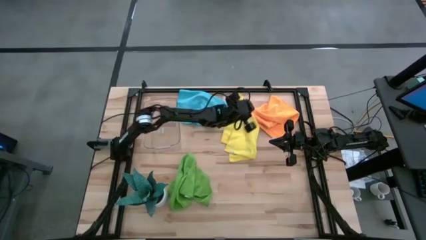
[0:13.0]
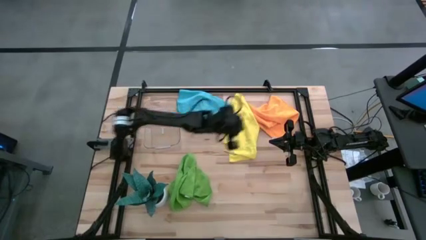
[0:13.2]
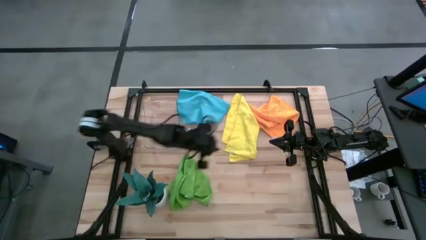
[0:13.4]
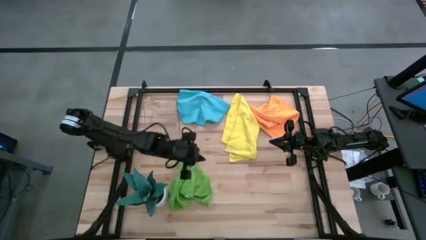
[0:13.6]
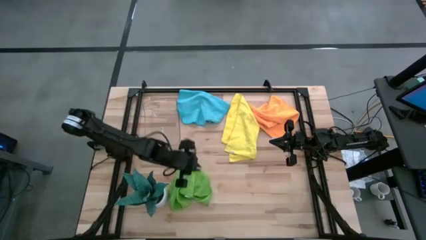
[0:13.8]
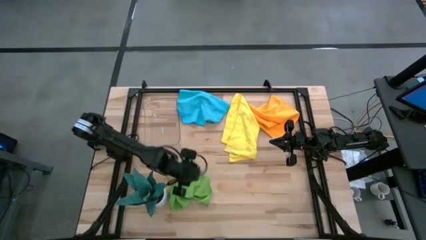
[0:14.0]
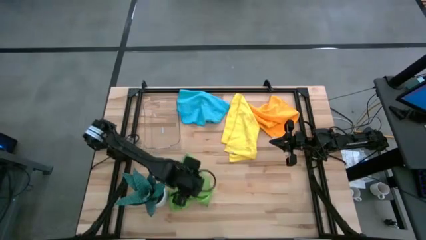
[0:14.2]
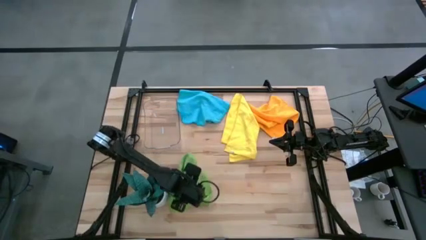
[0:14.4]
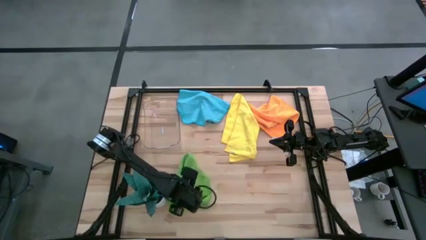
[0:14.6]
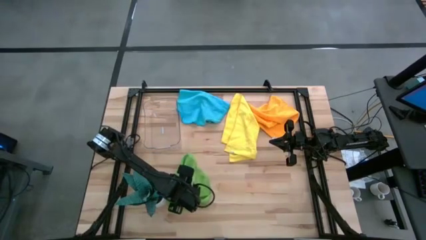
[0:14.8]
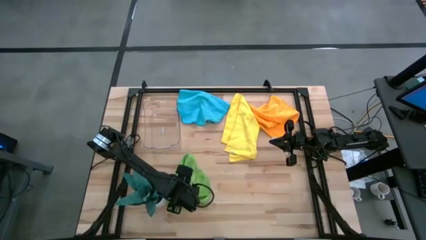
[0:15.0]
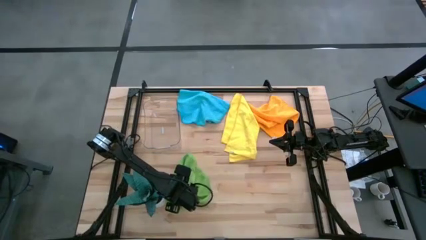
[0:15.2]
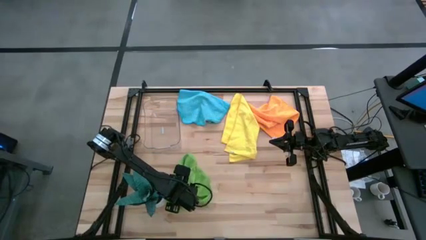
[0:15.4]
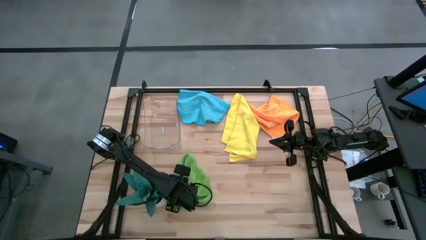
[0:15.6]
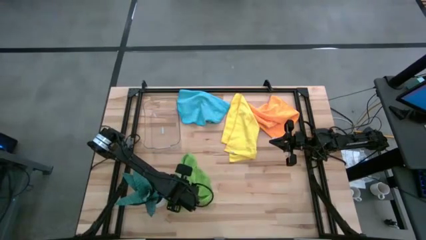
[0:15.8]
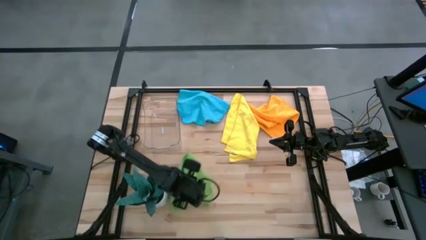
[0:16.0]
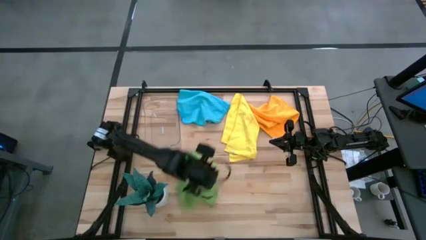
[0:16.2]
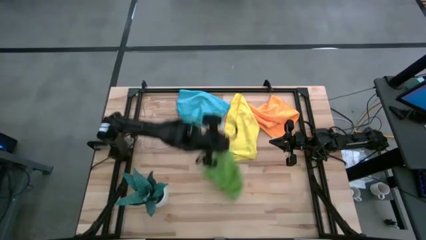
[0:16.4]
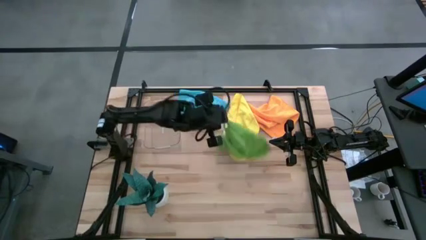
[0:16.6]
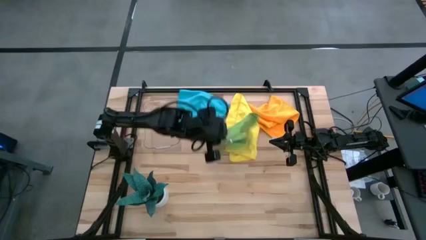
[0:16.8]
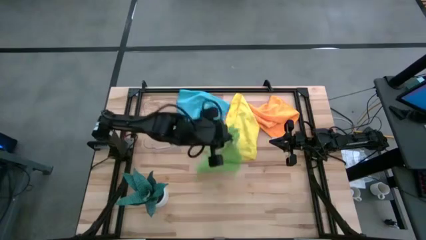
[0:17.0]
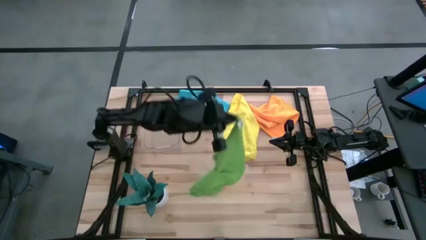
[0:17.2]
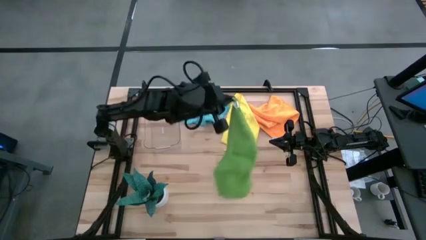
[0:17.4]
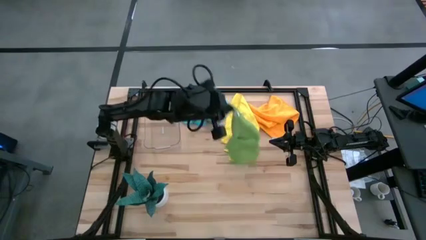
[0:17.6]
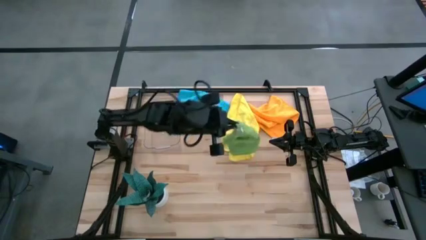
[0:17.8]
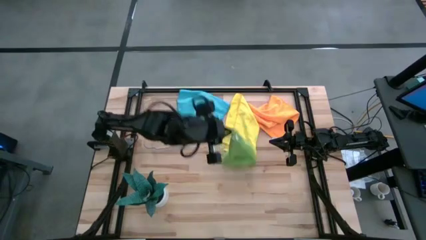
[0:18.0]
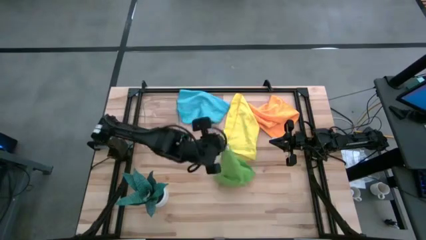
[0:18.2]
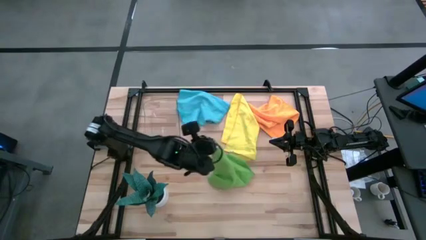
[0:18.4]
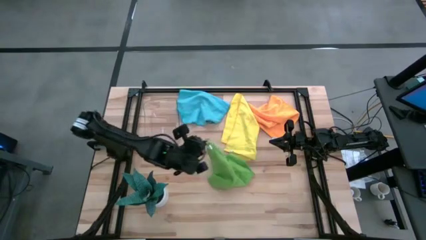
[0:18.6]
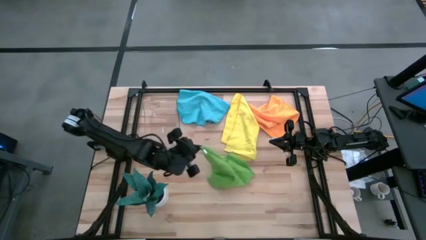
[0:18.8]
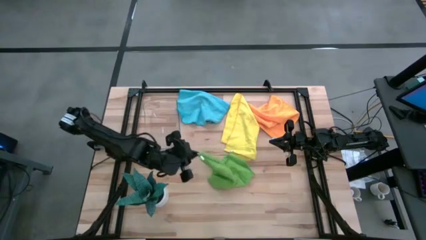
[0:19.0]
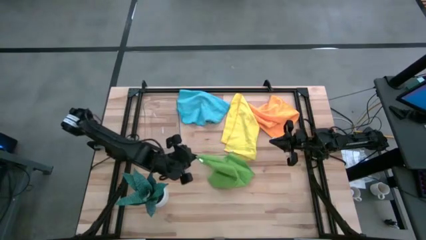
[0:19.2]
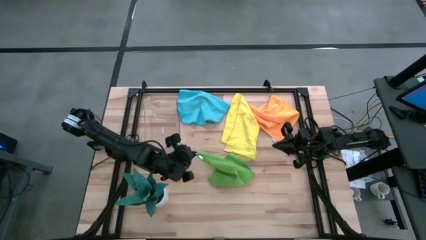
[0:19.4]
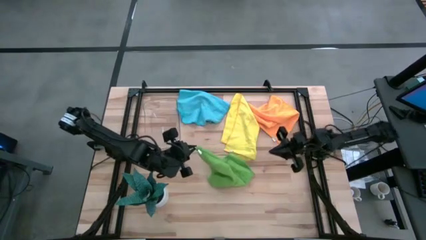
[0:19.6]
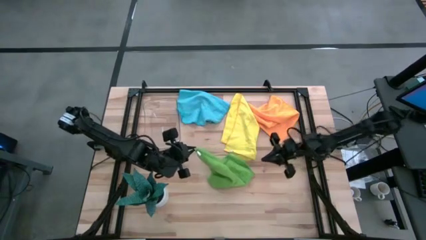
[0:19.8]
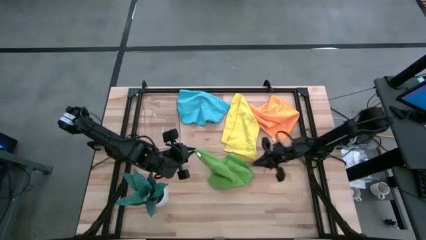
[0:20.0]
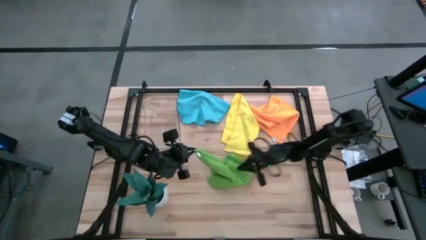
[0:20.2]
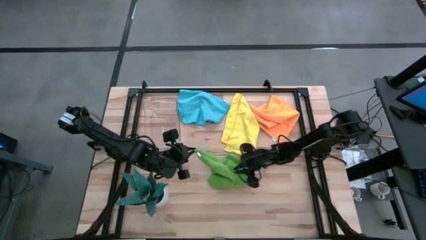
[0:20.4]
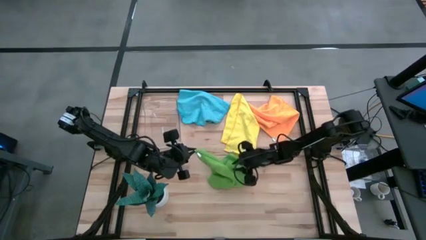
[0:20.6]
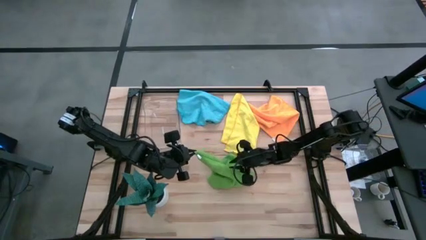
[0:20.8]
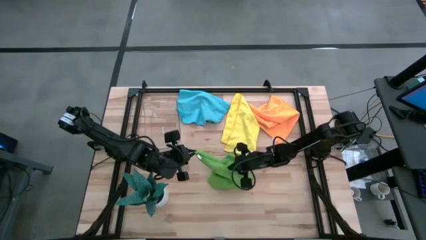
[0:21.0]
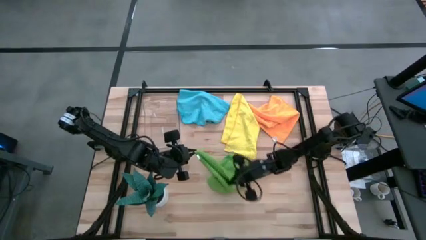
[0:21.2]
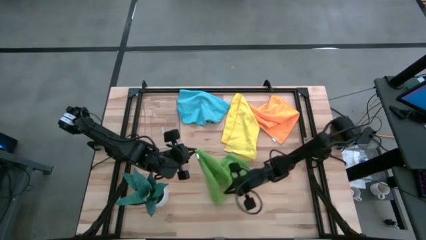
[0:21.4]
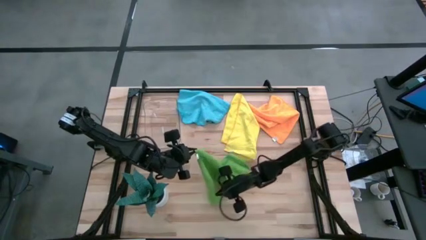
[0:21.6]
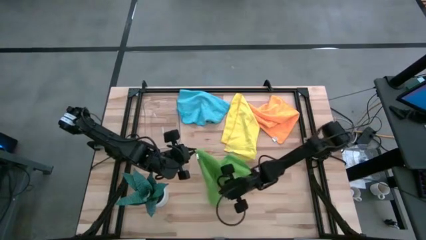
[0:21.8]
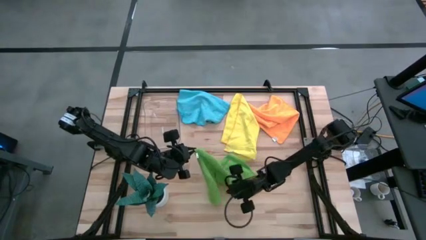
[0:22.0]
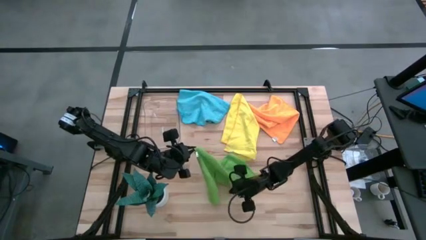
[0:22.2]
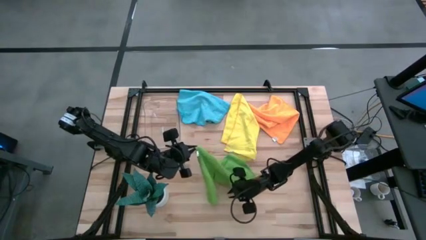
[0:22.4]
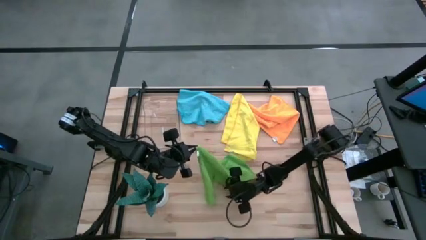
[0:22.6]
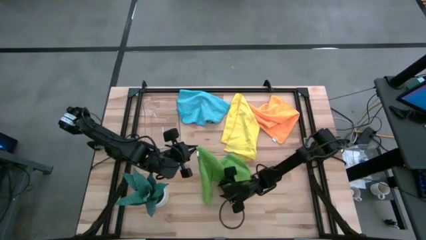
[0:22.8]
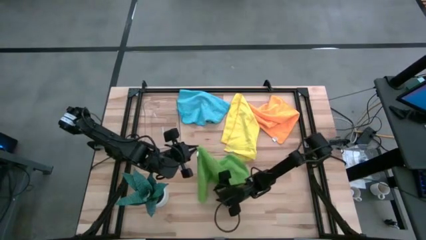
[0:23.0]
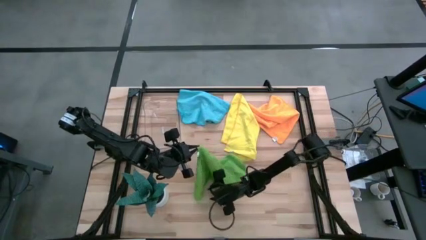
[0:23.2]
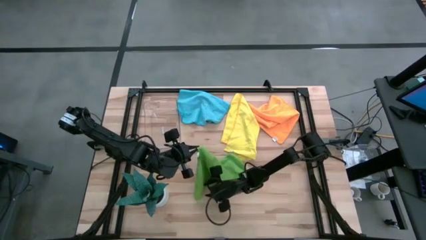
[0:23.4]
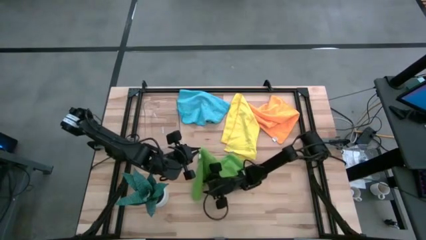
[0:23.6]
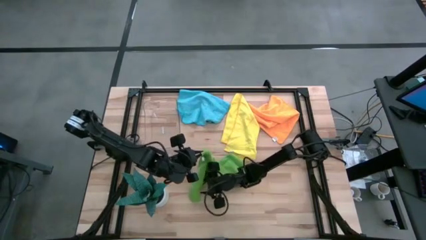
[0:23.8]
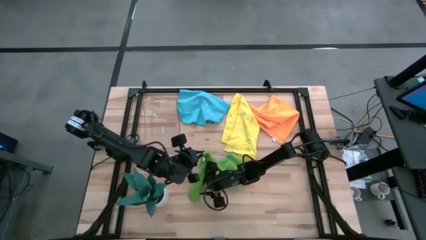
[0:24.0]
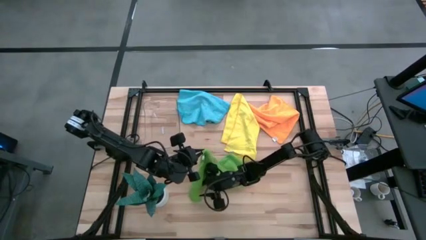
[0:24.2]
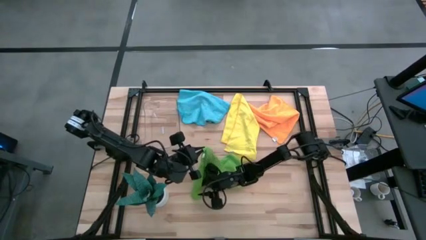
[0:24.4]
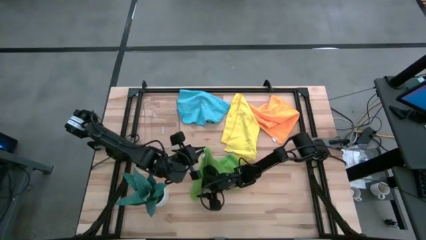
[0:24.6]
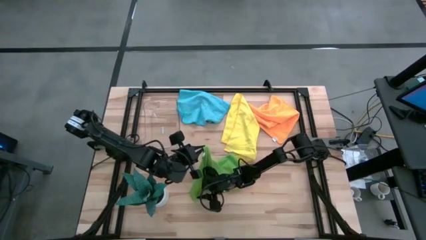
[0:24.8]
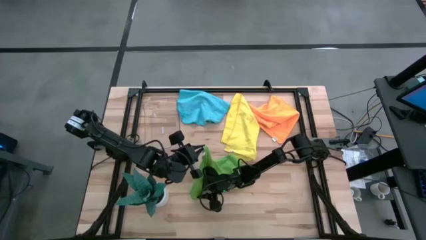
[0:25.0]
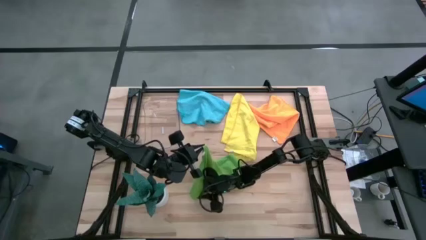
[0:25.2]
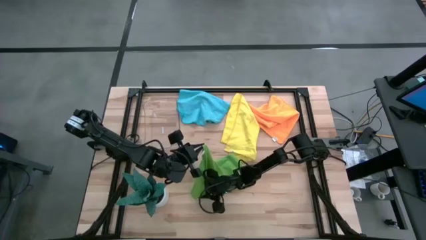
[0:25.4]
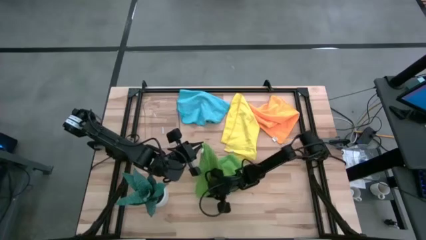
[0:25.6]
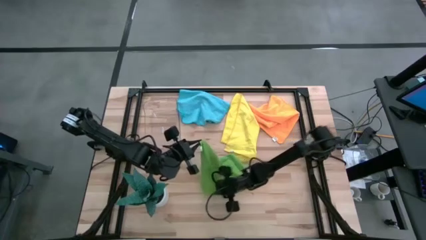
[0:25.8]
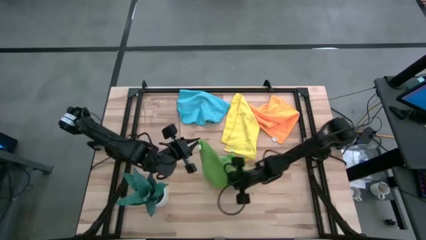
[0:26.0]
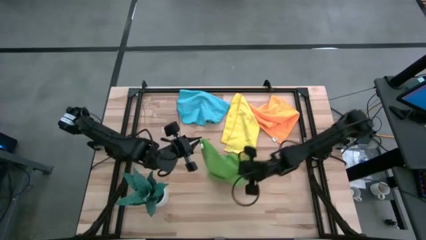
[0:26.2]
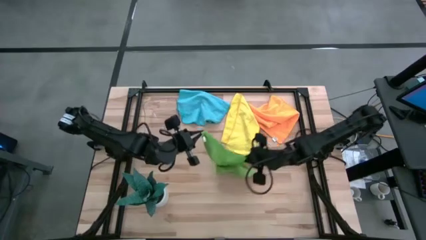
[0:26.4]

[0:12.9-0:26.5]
Task: Roll microfiber towels into tight, uniform cylinder then place into a basket
Fold the green microfiber towel
